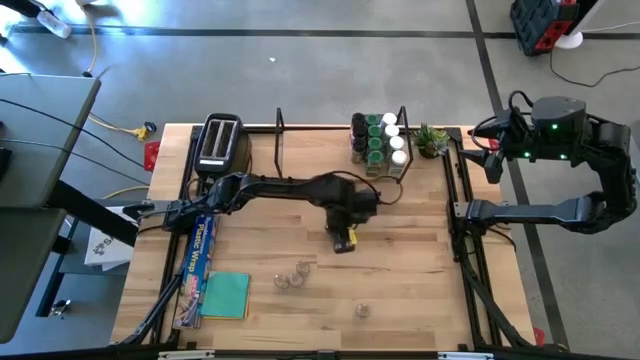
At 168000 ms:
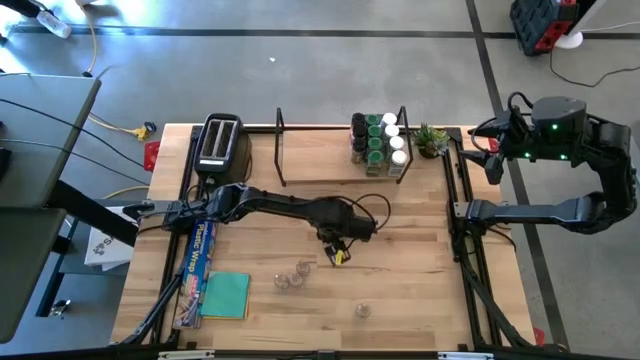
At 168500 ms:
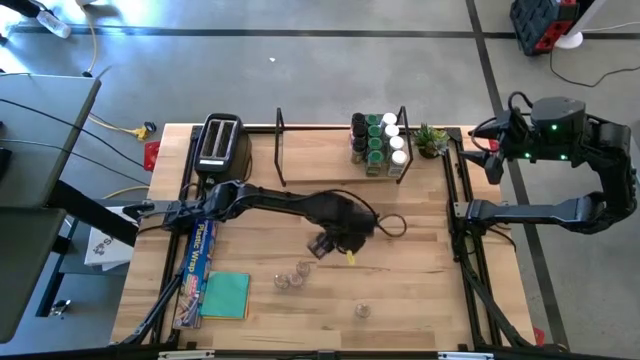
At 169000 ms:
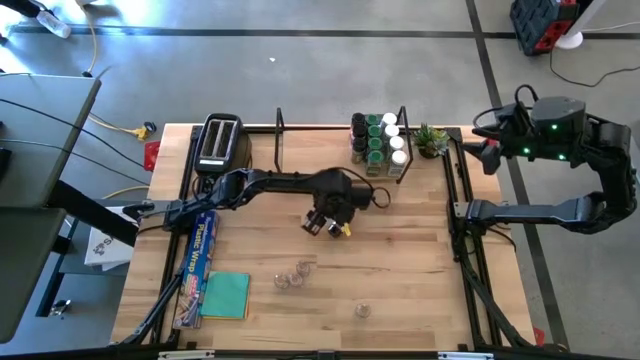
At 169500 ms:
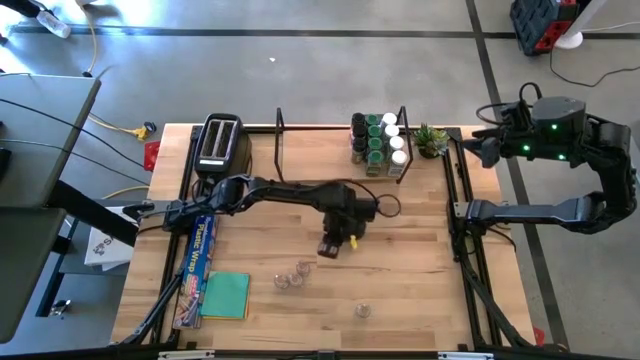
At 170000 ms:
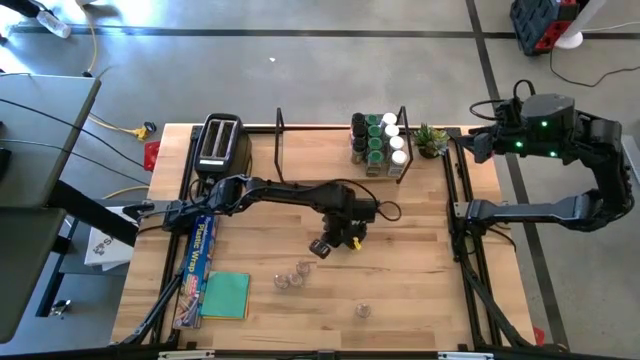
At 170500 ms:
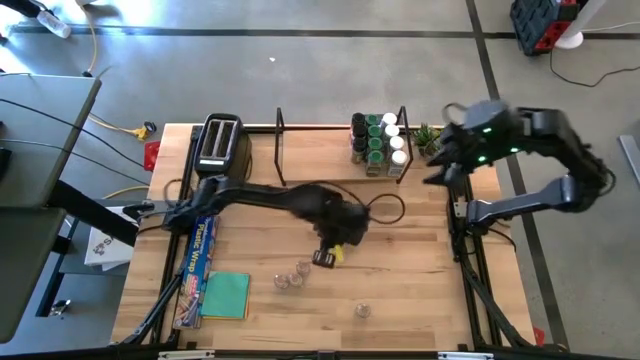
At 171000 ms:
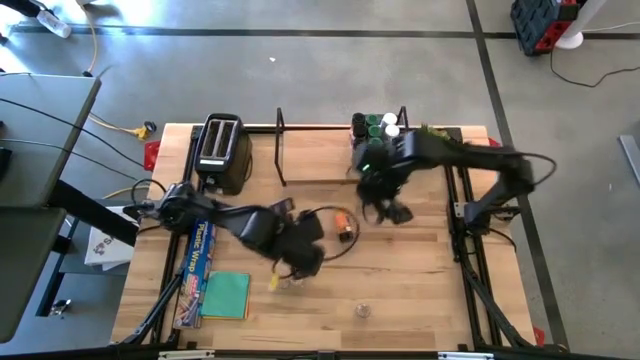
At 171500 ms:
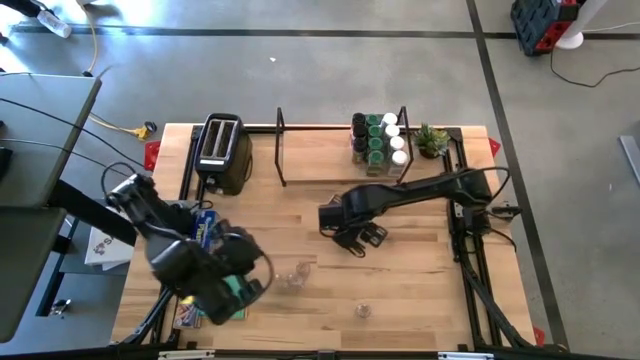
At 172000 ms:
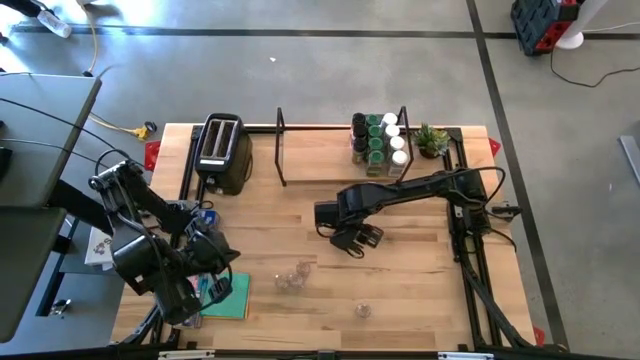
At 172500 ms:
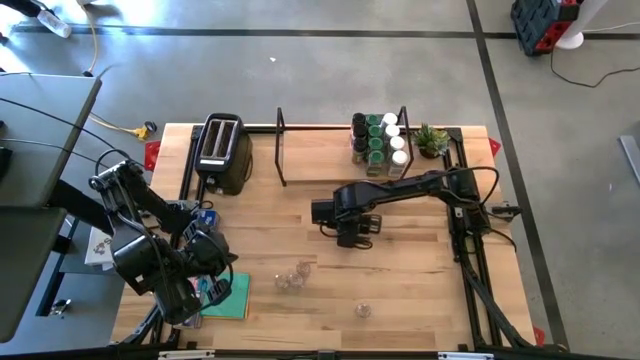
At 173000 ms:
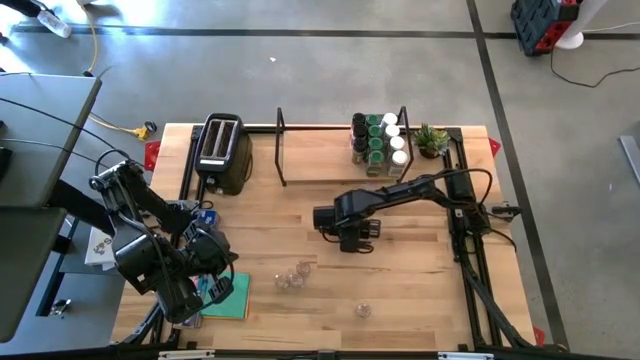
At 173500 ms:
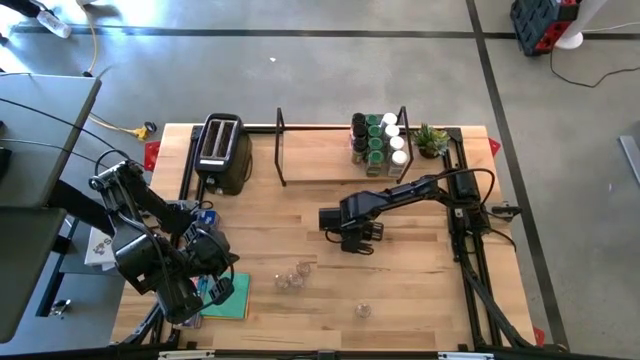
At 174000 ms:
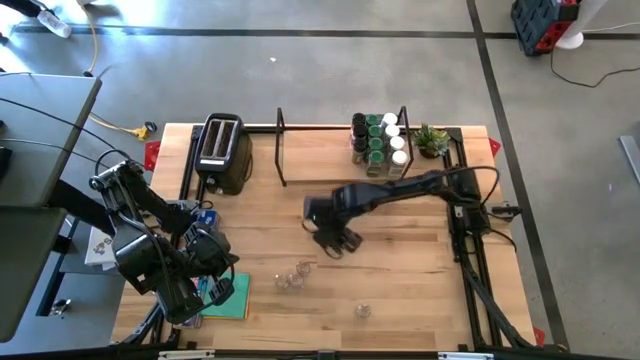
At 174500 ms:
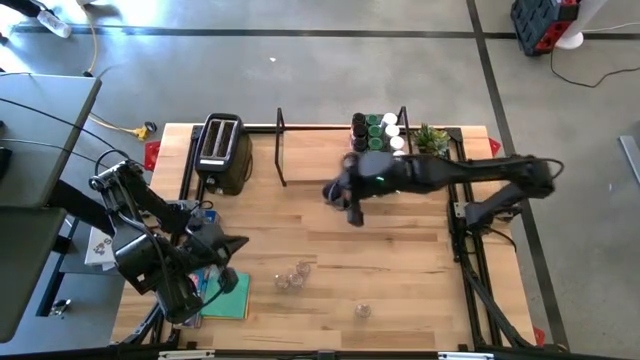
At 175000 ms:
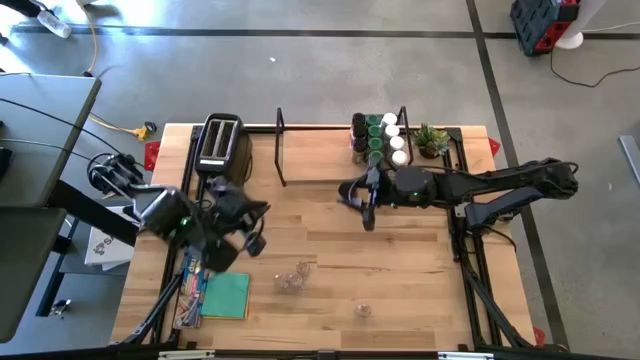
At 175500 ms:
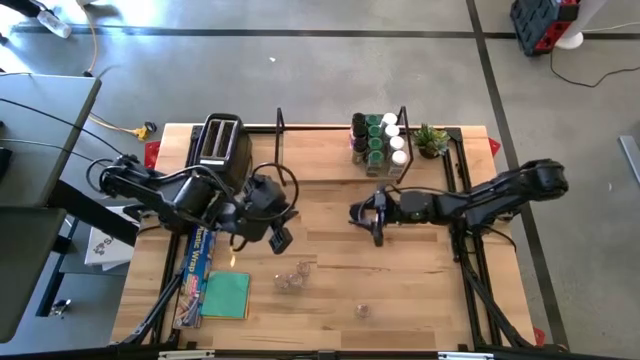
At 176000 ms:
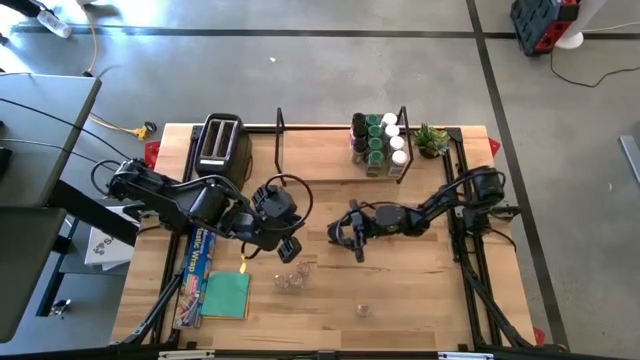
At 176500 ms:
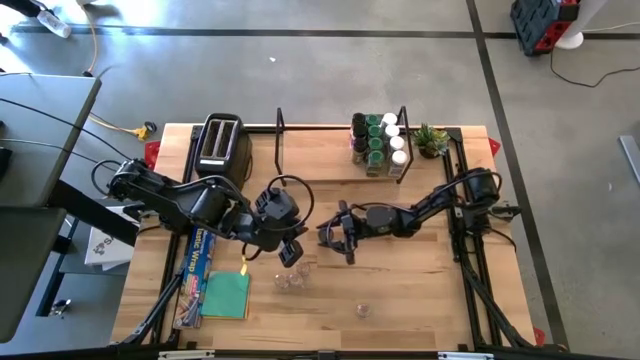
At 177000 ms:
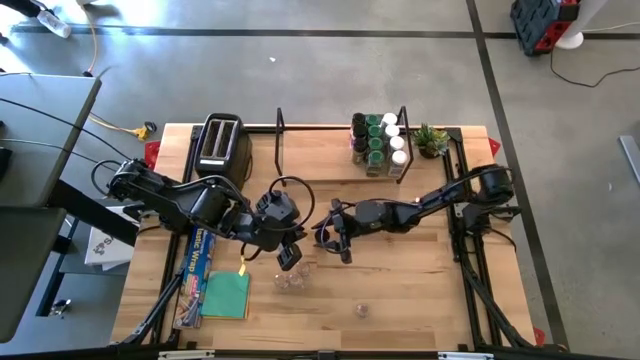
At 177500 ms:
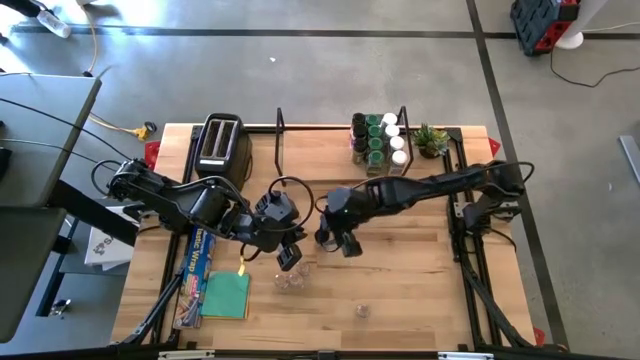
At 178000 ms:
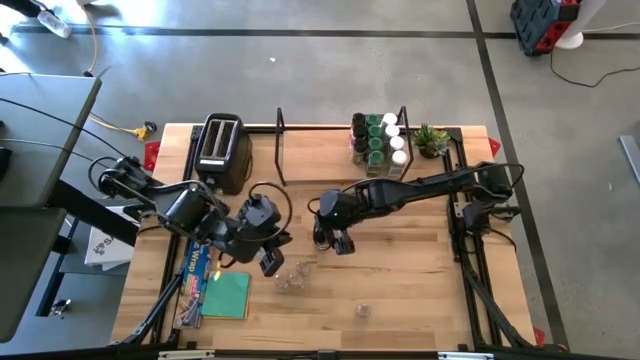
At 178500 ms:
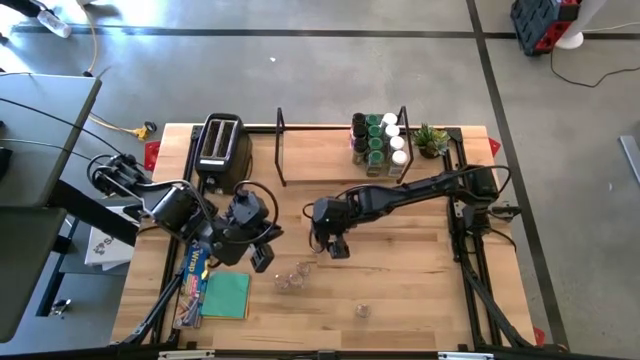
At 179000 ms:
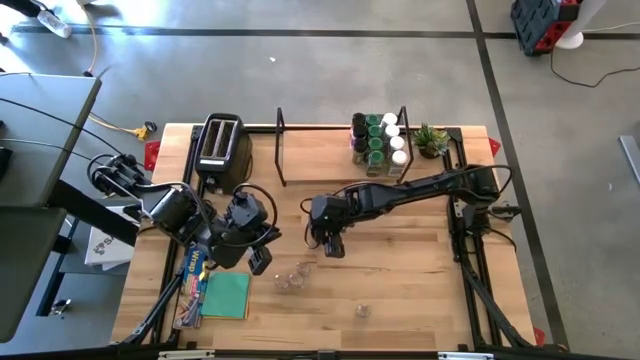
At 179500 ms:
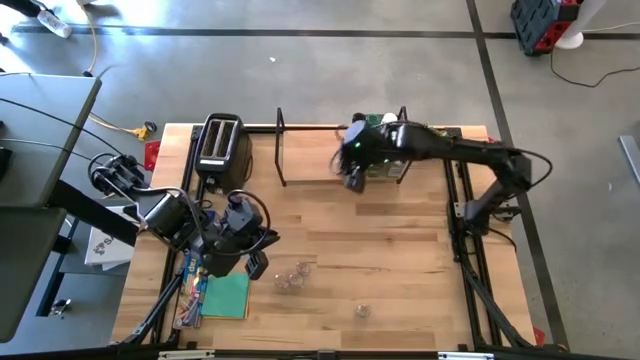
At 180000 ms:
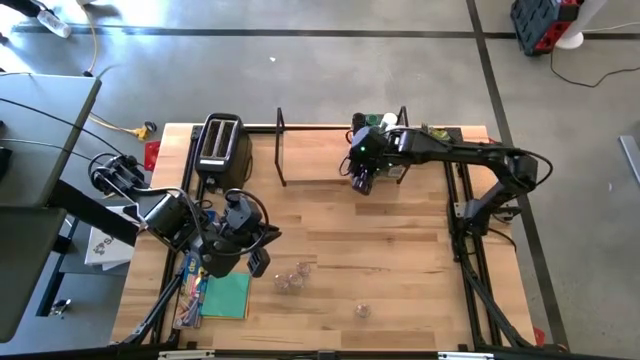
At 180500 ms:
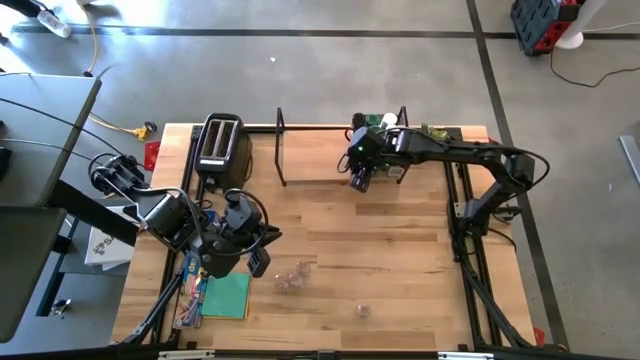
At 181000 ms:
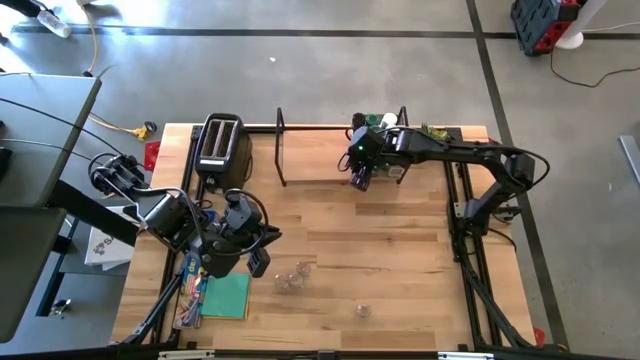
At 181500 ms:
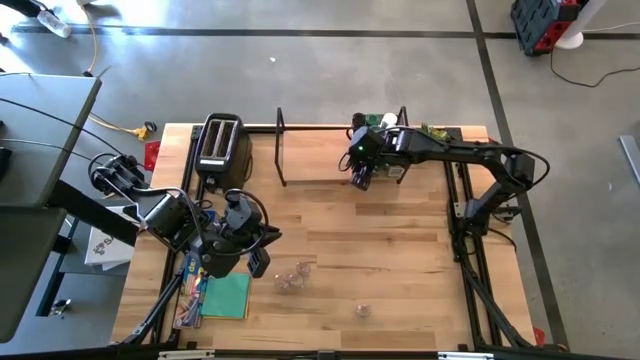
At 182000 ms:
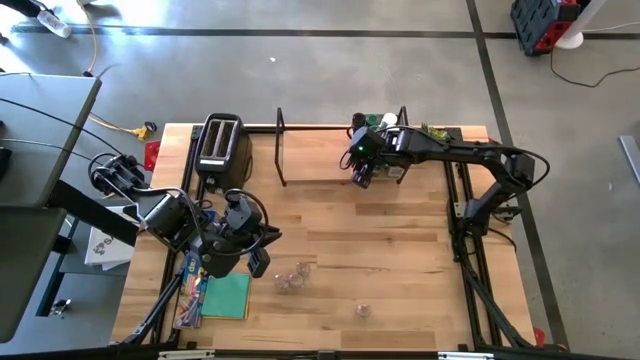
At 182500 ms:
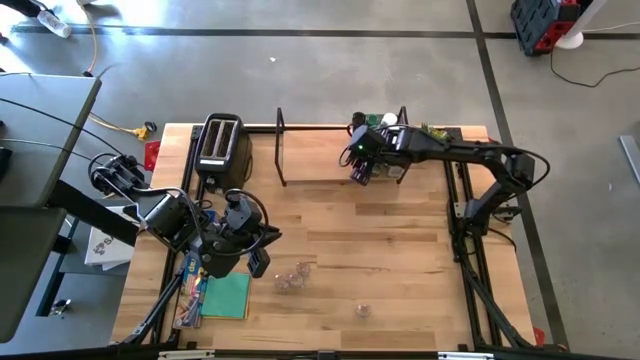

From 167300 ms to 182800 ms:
Task: Shelf spices
Put the black seasoning bottle on the shelf and align it with the other black seasoning bottles

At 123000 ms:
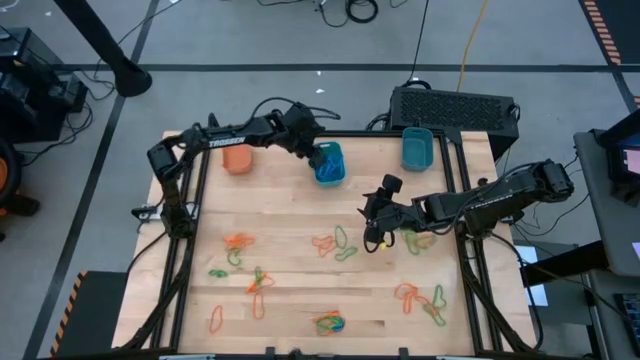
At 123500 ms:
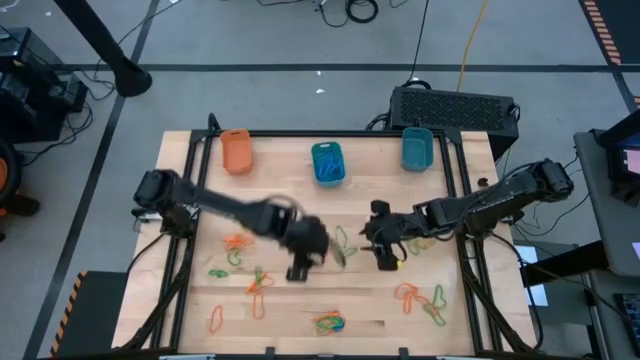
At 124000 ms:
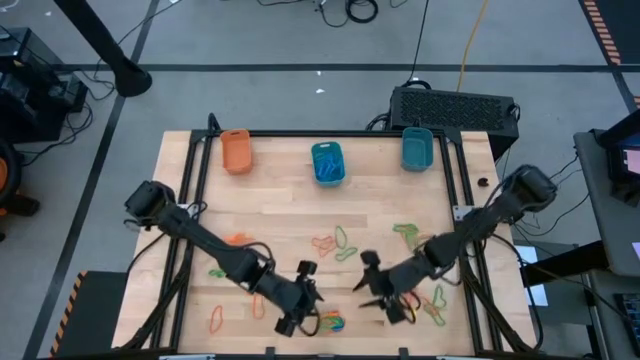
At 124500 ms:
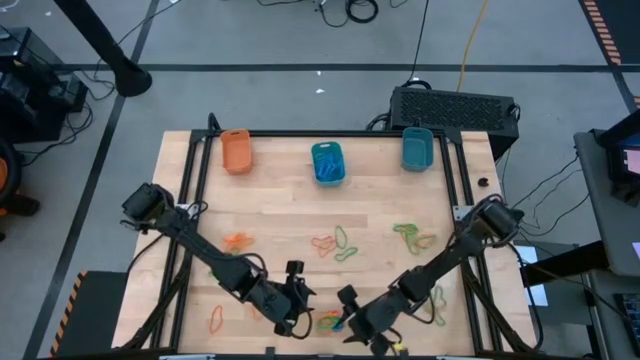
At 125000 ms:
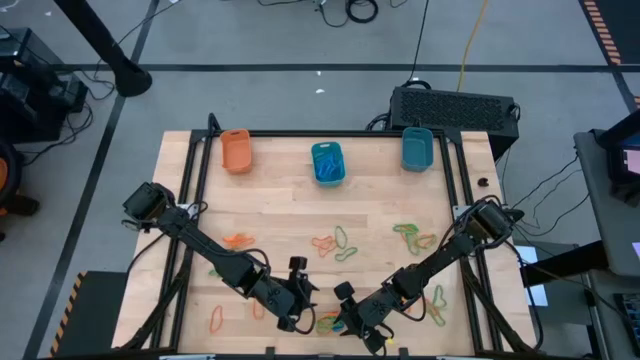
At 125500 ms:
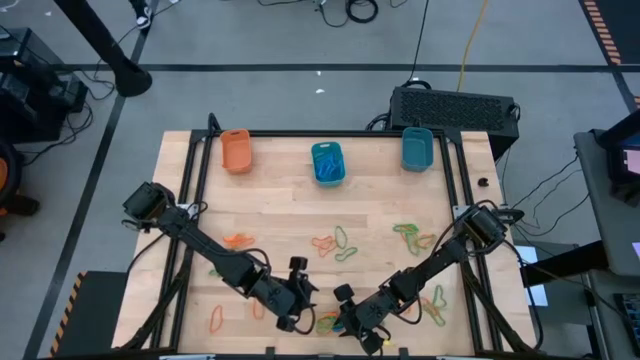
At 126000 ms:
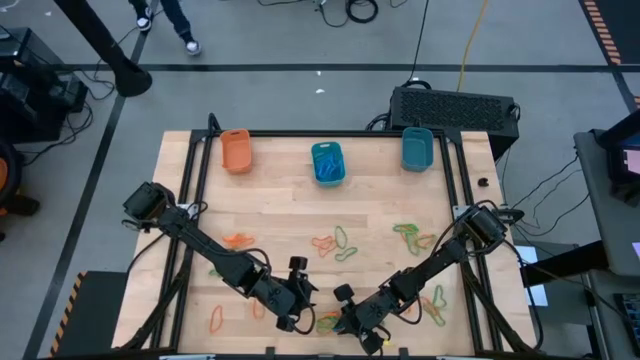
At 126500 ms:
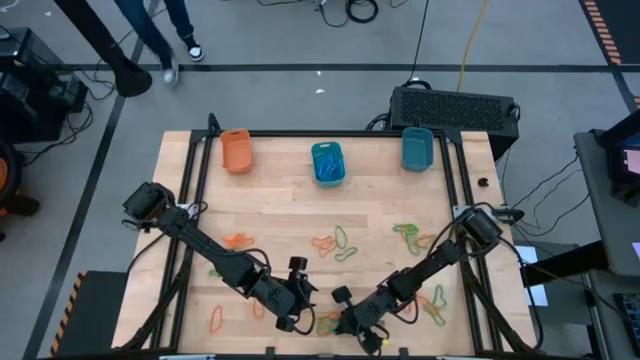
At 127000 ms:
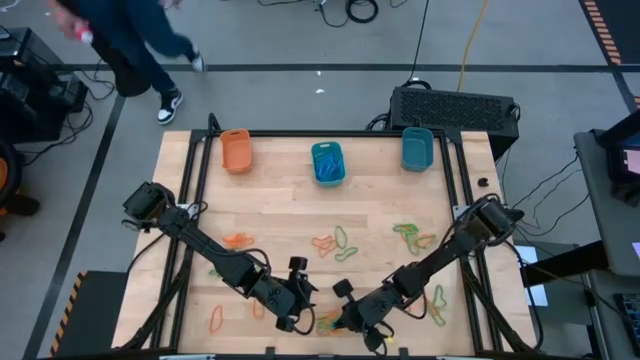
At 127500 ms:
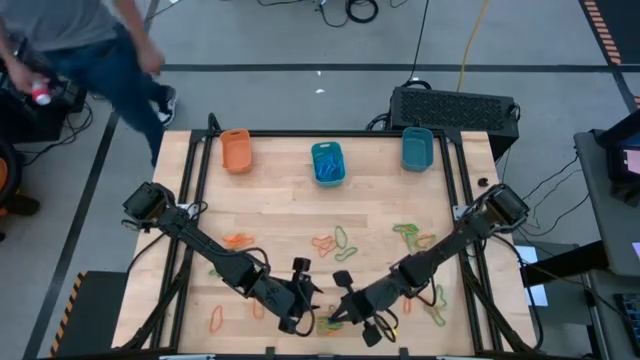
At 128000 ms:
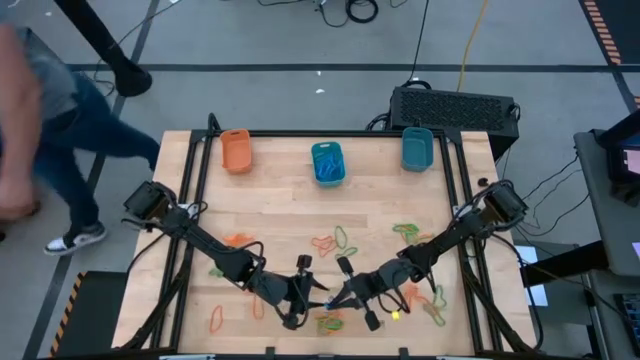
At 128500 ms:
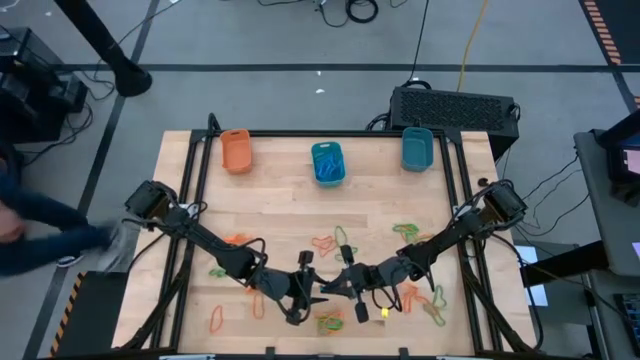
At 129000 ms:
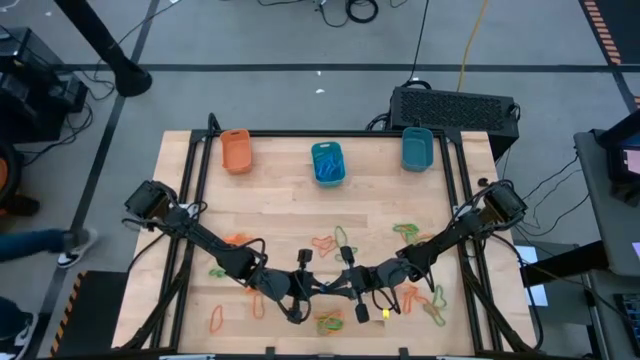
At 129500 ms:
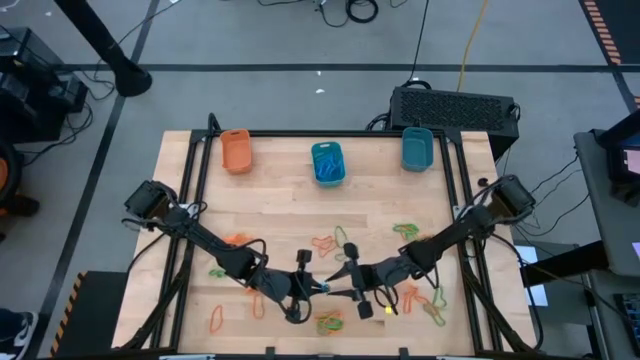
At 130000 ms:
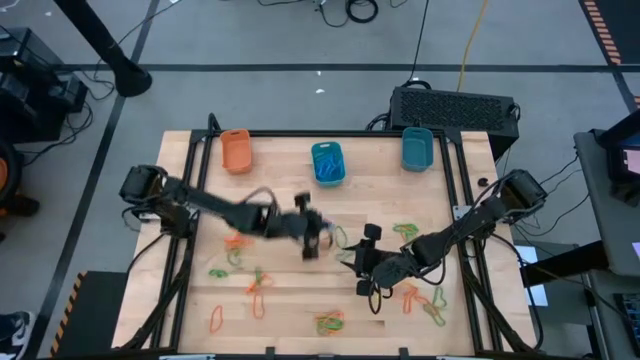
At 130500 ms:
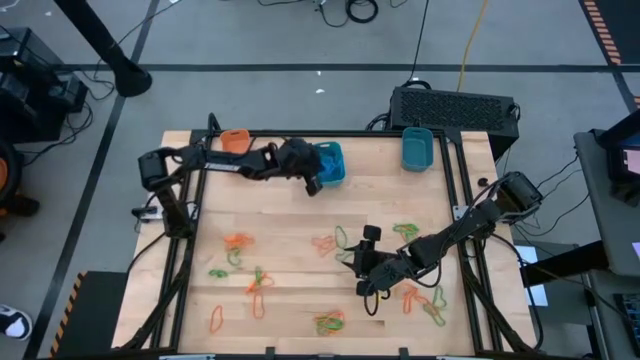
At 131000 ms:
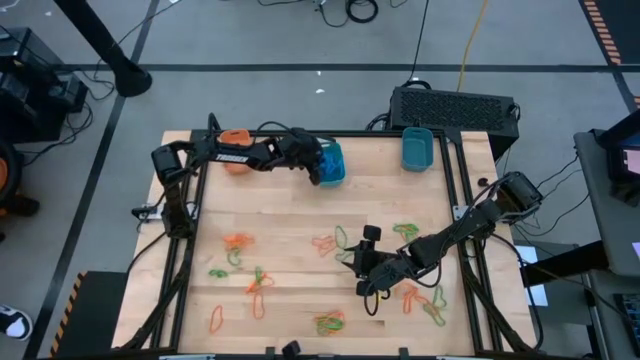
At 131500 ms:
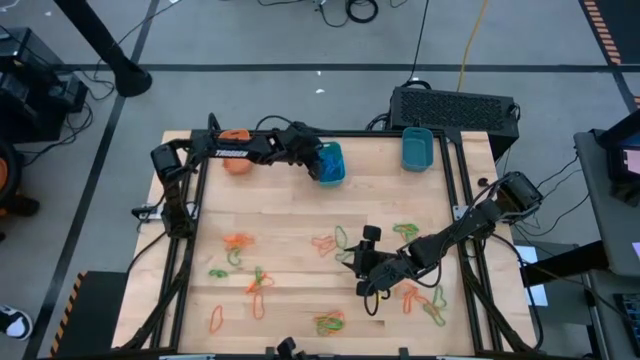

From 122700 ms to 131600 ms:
Task: Sort rubber bands into baskets
Put the blue rubber band into the light blue bin
